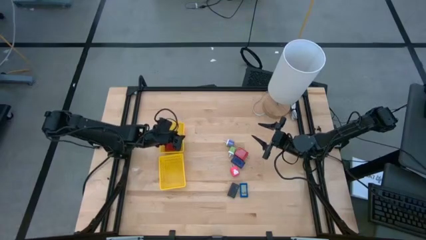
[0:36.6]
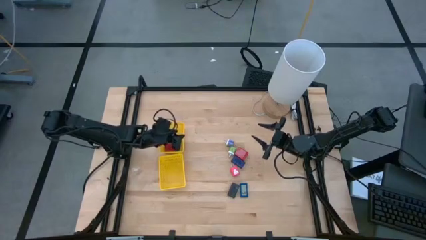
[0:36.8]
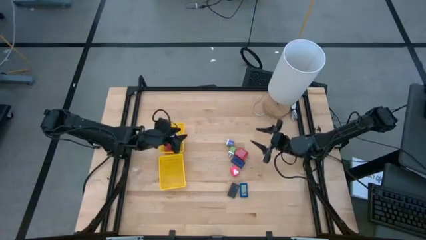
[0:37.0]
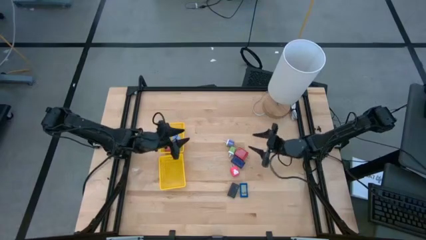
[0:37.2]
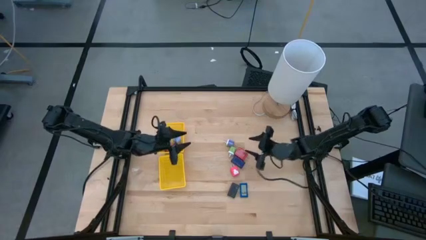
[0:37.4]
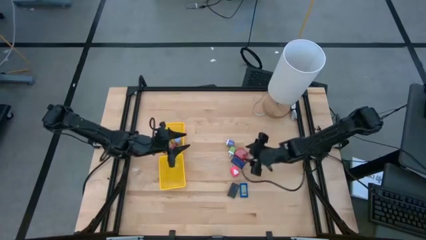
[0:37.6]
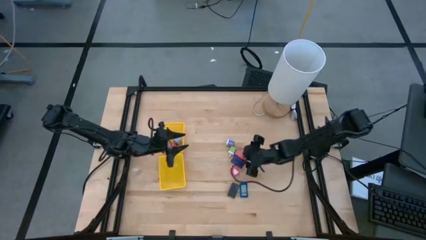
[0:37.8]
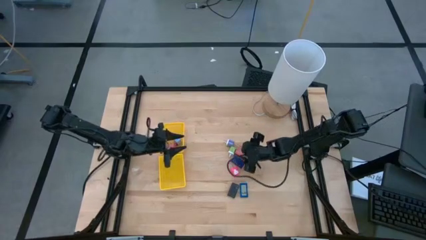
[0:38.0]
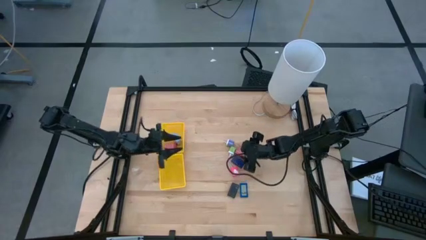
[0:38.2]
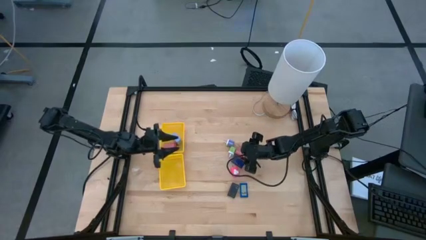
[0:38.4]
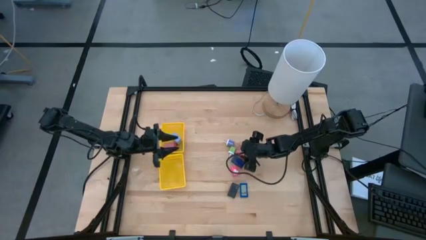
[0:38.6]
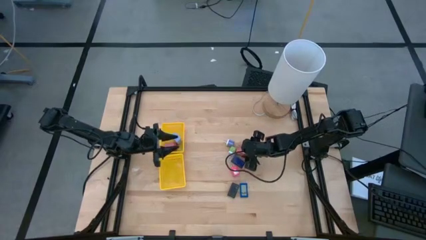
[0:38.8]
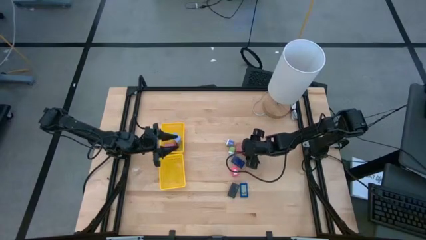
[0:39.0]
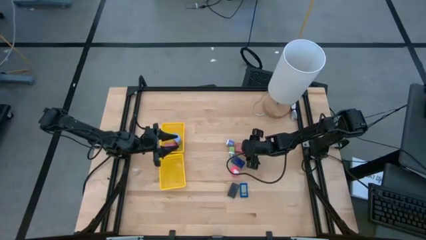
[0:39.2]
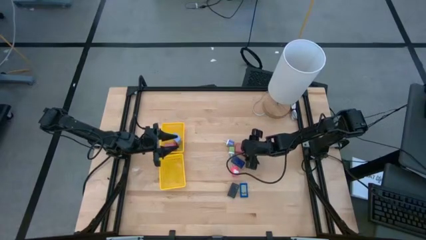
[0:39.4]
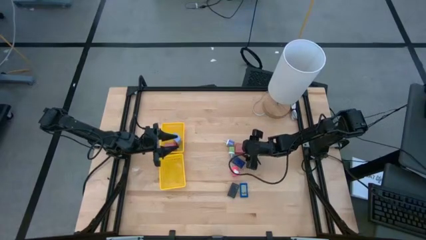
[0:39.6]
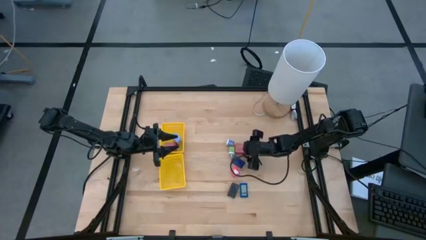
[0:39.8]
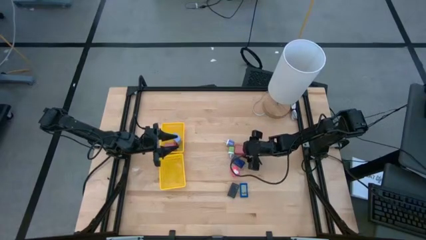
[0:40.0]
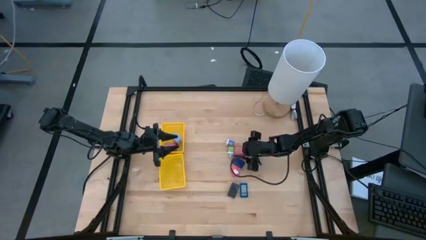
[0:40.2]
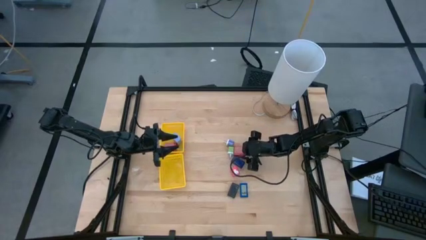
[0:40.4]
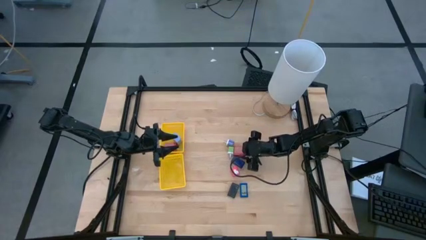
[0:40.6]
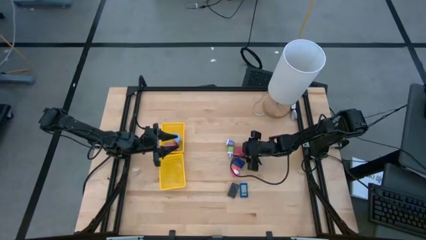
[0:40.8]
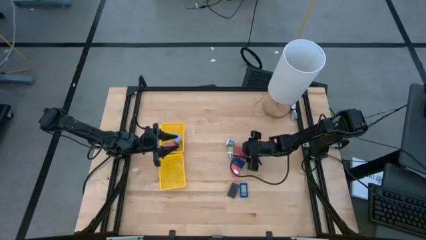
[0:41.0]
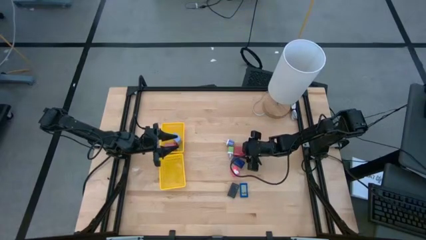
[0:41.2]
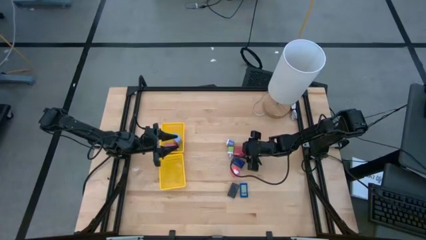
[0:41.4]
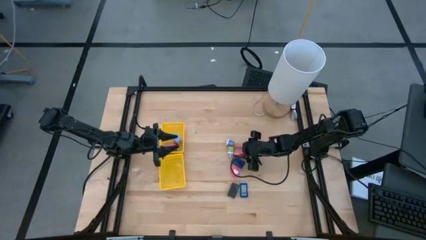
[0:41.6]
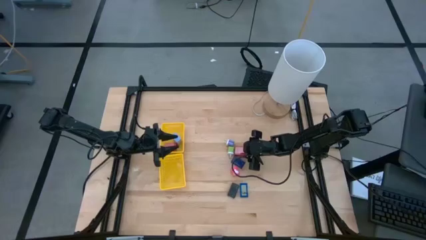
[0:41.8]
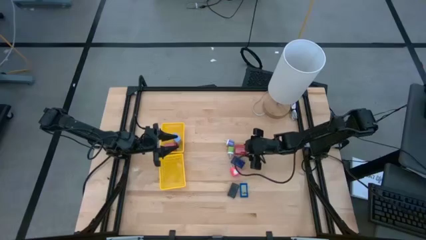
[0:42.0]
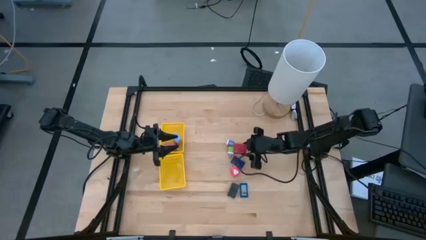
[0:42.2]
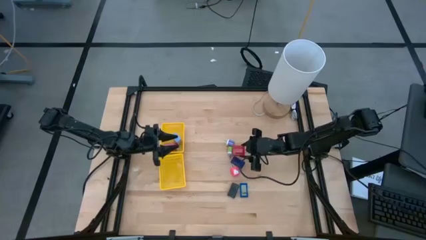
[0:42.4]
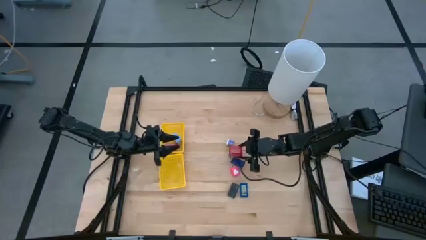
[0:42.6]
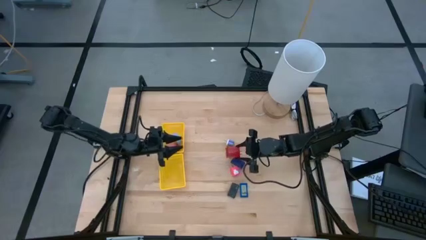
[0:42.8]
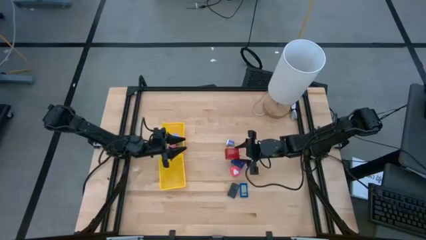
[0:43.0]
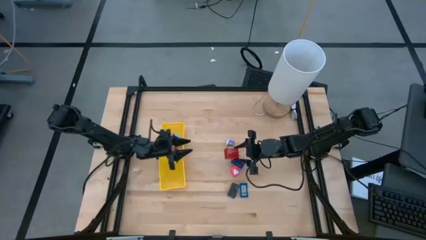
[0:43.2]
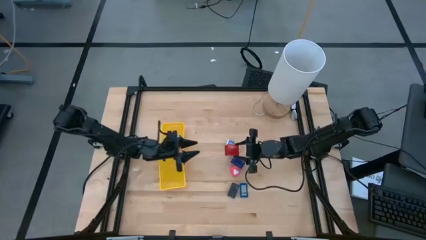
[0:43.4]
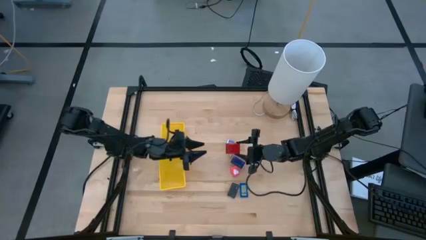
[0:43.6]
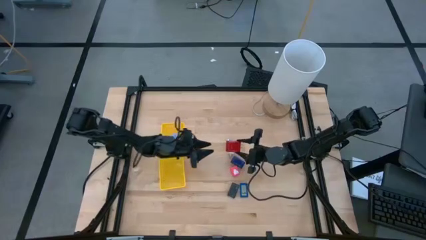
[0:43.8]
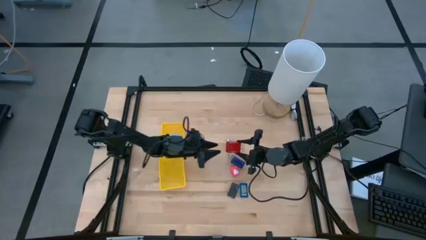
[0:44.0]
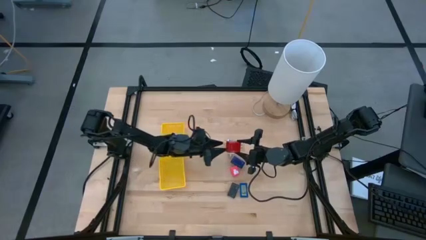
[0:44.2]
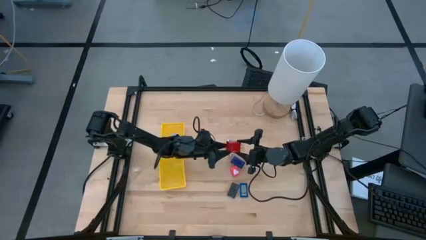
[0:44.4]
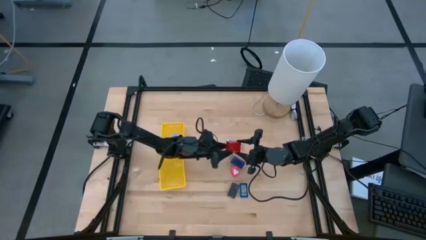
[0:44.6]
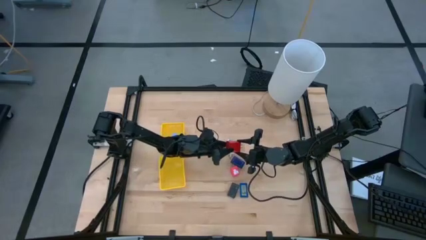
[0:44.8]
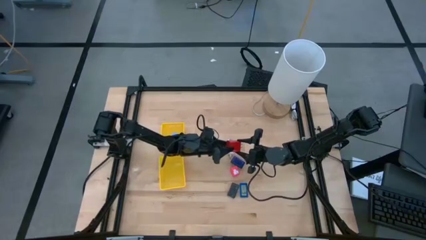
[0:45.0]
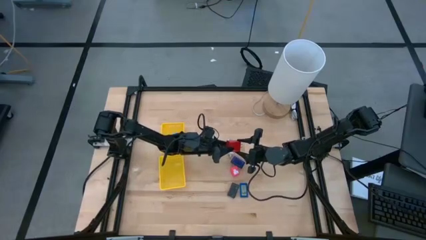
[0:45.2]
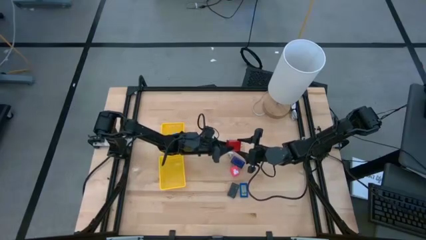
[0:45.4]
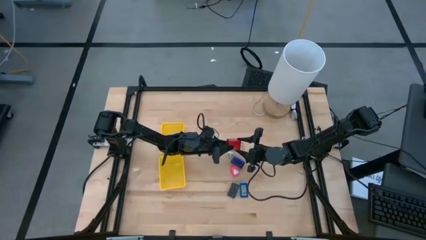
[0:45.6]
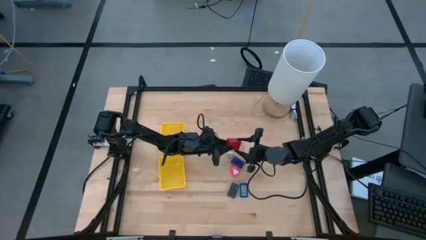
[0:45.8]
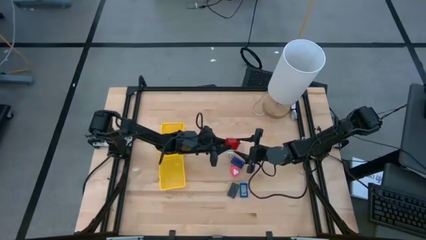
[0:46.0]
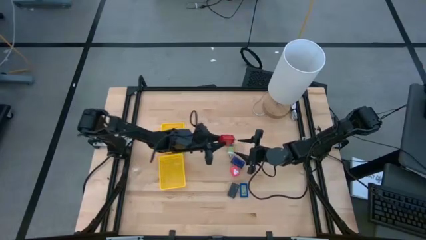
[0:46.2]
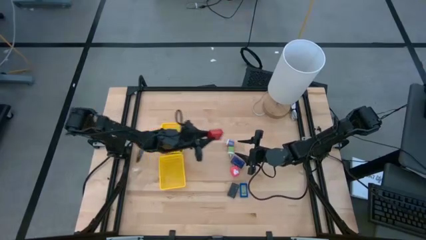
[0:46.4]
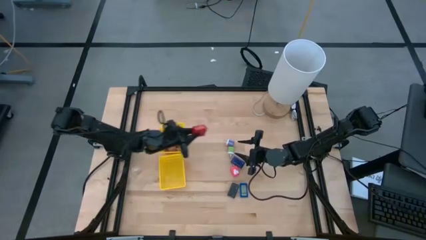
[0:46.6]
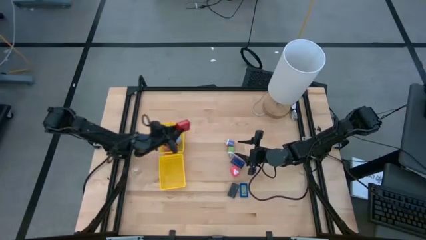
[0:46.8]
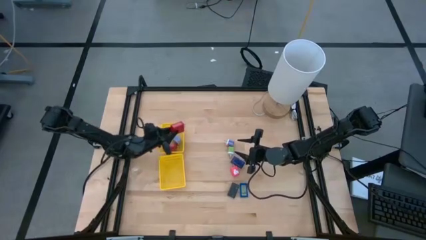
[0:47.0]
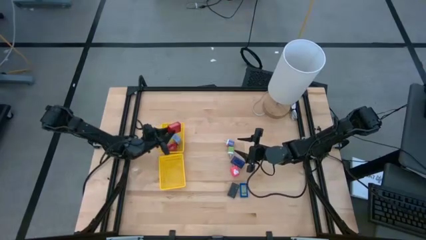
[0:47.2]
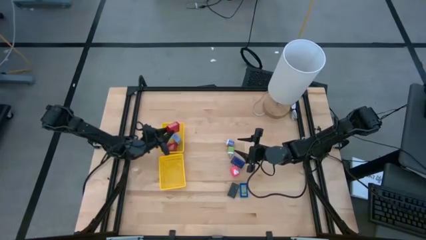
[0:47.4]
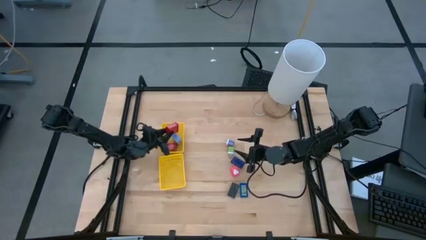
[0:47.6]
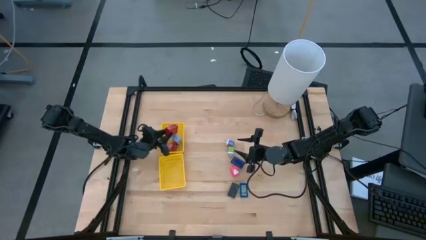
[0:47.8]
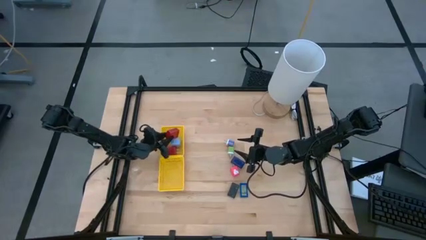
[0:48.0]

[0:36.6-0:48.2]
Task: Pick & Place Office items
Put the red charger adapter into the top yellow bin

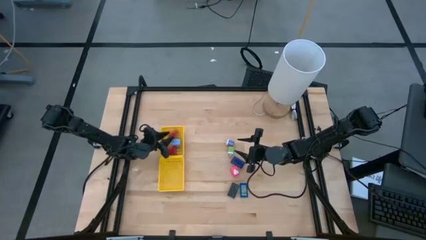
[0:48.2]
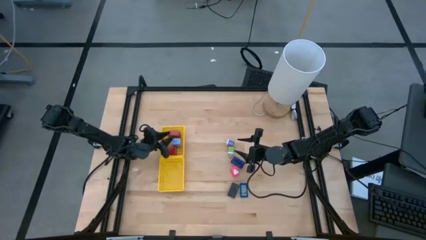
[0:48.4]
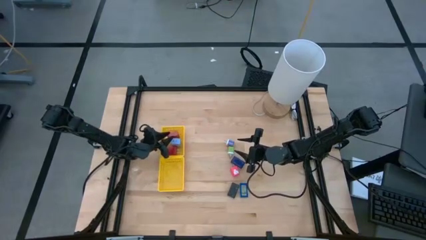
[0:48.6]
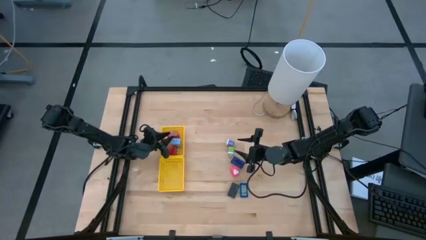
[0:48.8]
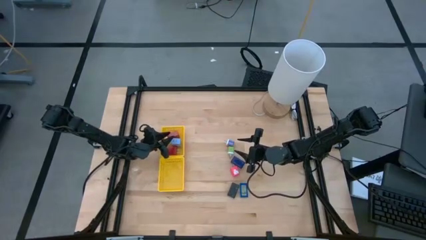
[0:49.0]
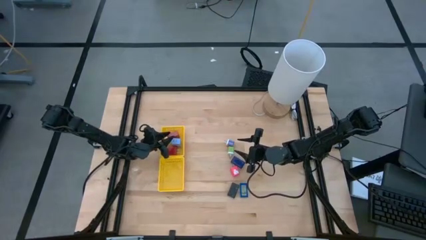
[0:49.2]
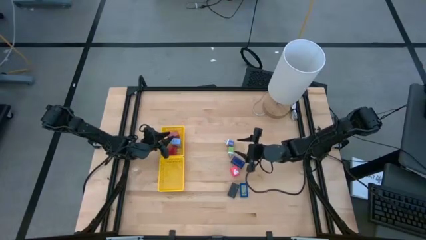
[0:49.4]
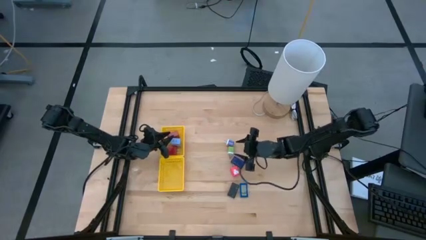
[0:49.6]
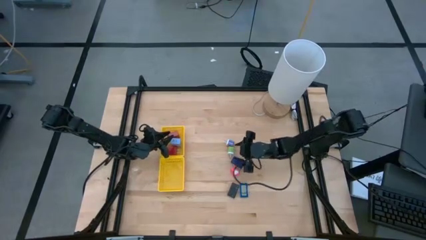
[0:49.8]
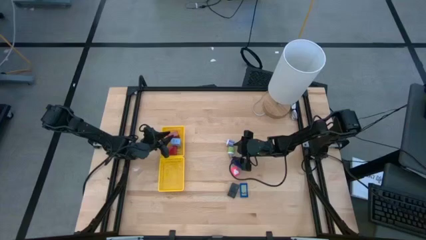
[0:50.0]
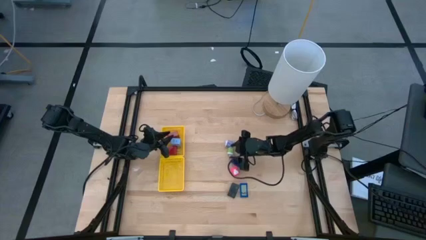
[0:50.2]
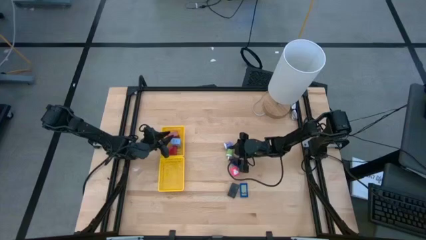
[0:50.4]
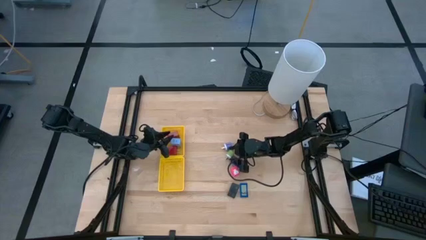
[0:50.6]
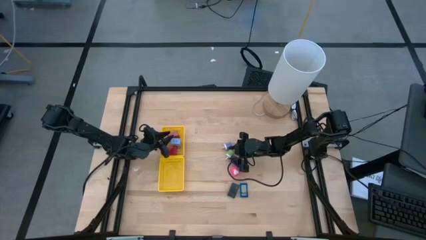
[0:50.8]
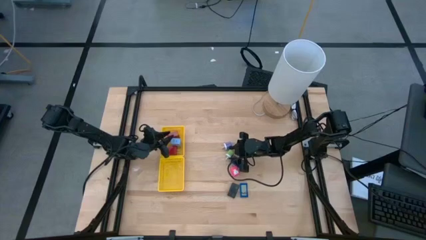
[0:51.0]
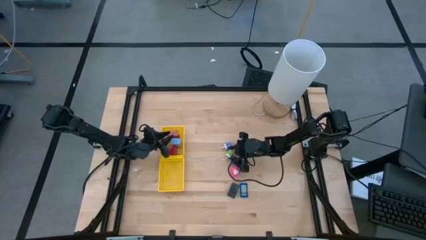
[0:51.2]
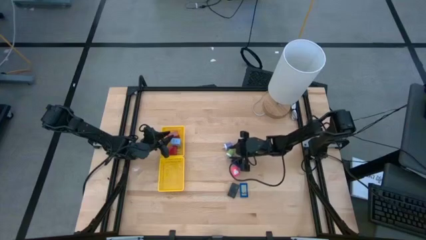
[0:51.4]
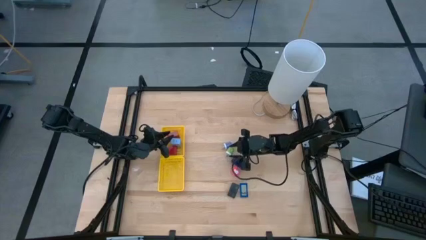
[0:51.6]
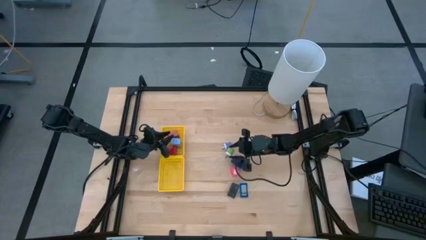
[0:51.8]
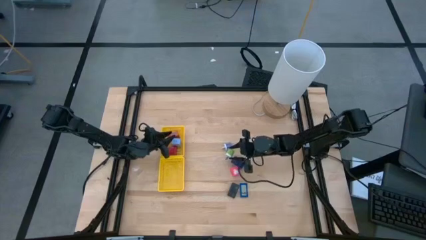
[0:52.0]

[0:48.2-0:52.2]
Put the green charger adapter into the top yellow bin
